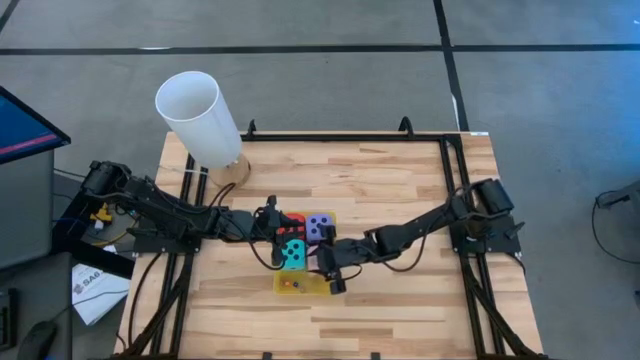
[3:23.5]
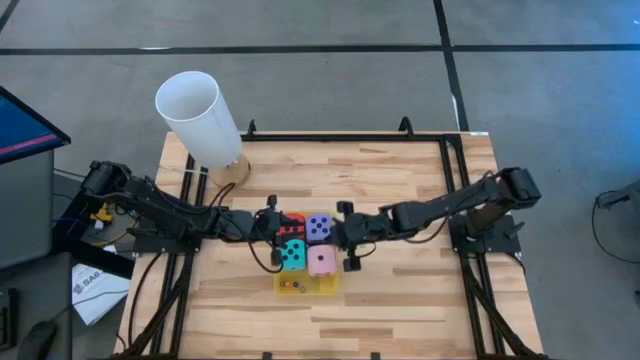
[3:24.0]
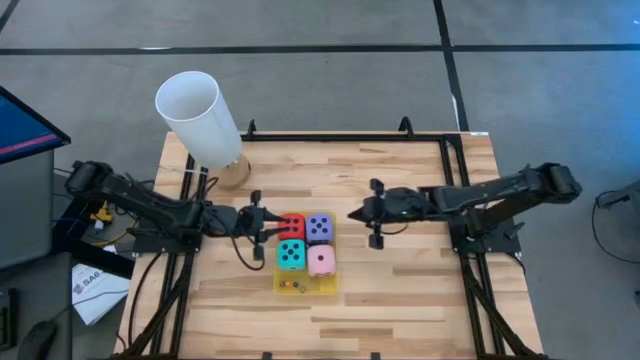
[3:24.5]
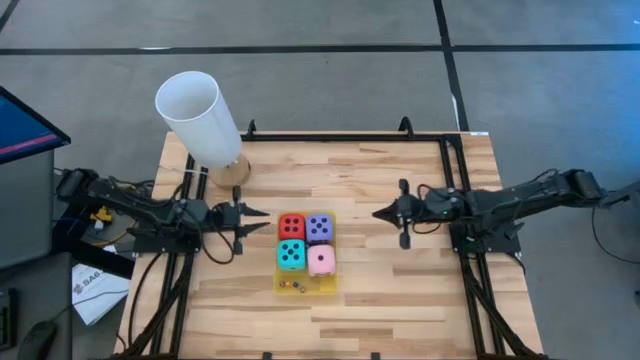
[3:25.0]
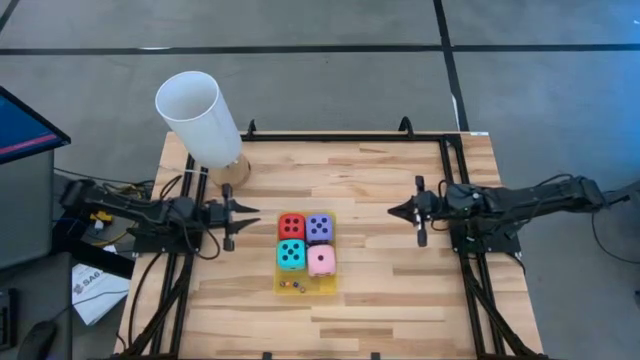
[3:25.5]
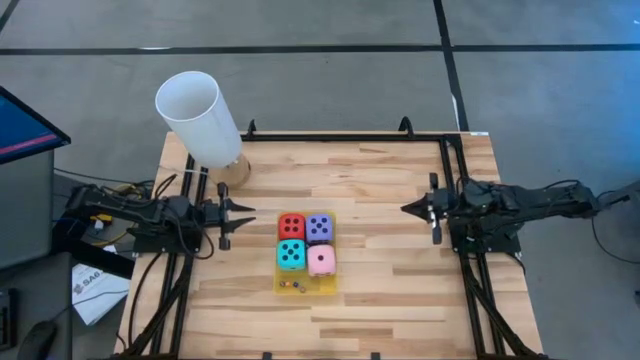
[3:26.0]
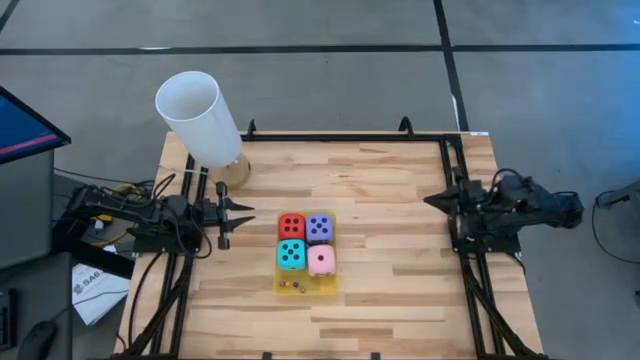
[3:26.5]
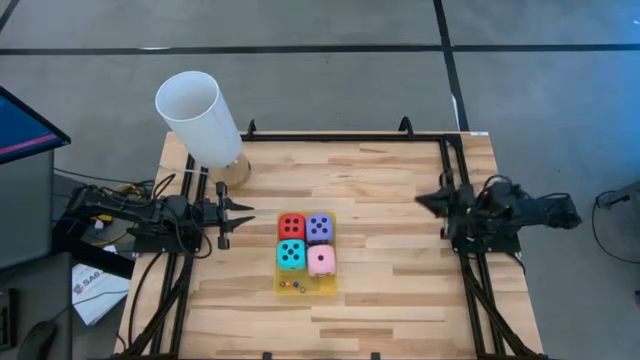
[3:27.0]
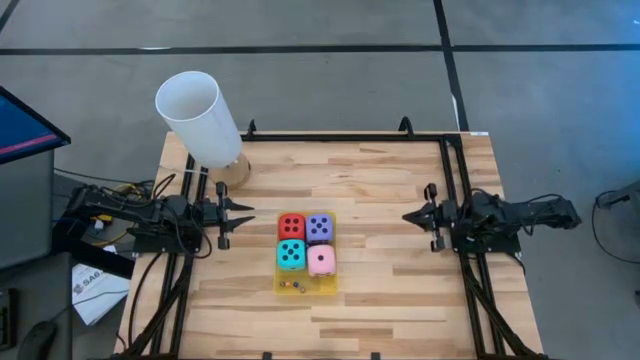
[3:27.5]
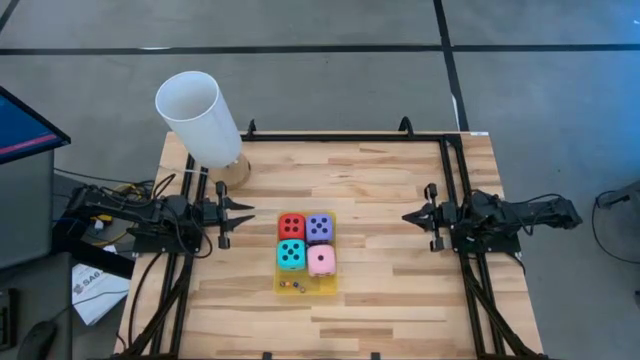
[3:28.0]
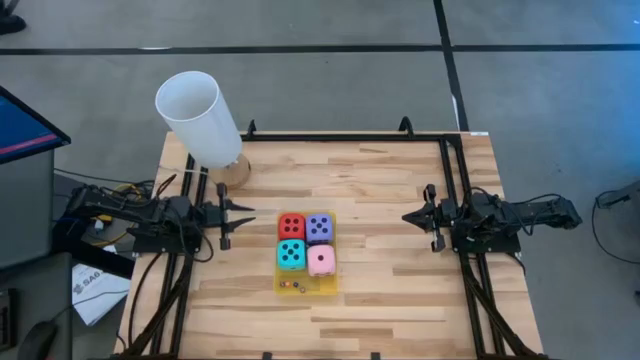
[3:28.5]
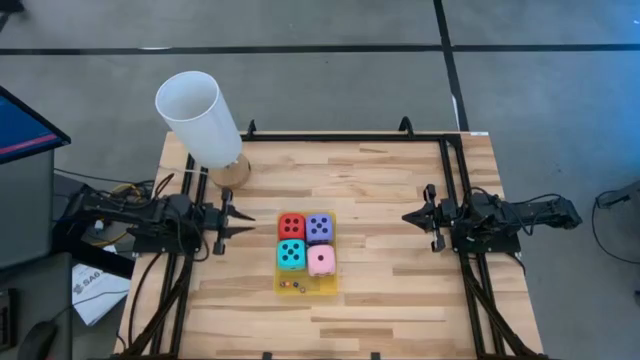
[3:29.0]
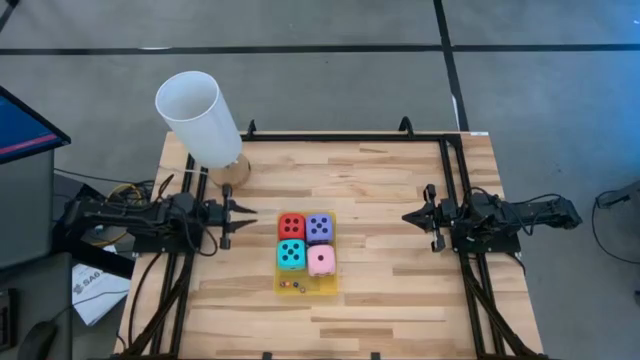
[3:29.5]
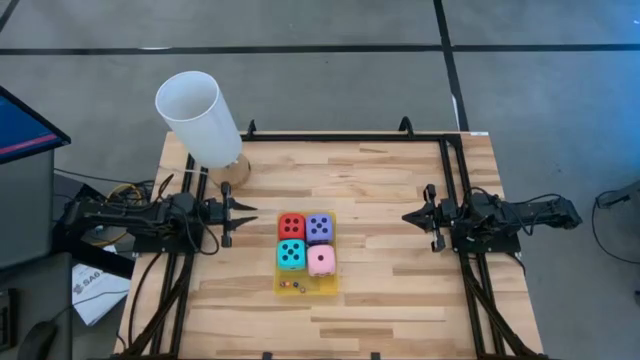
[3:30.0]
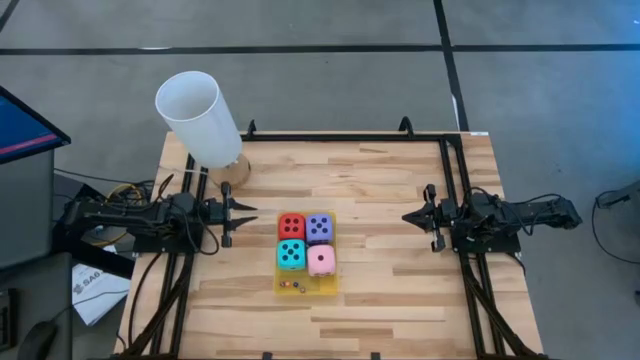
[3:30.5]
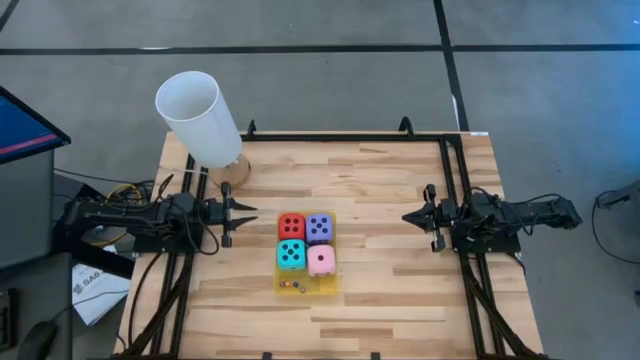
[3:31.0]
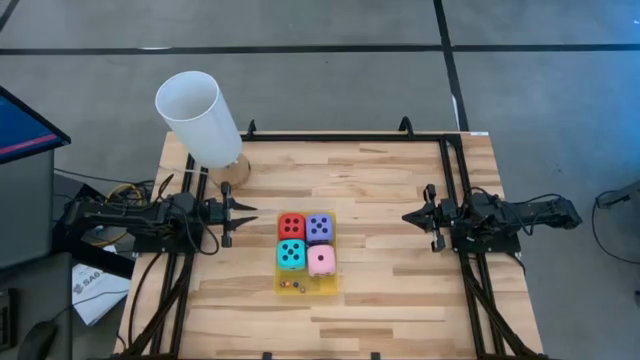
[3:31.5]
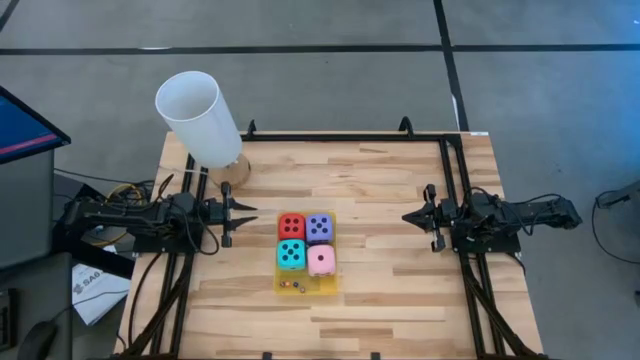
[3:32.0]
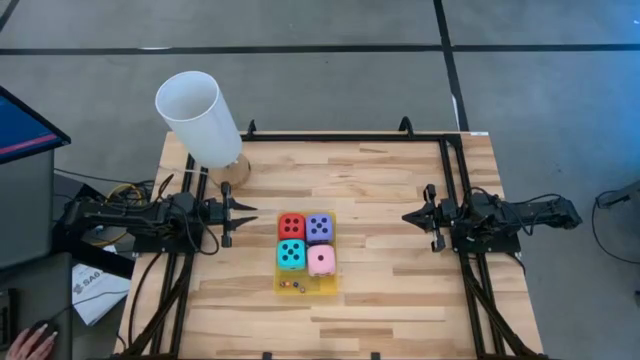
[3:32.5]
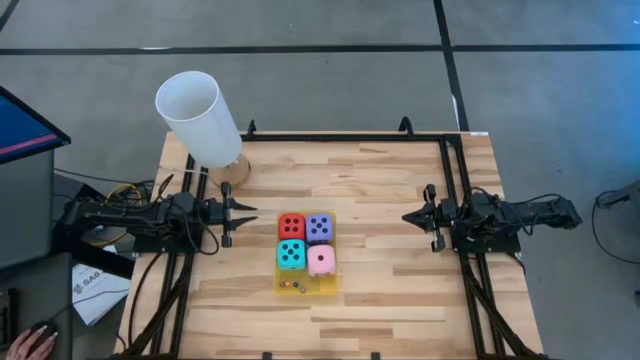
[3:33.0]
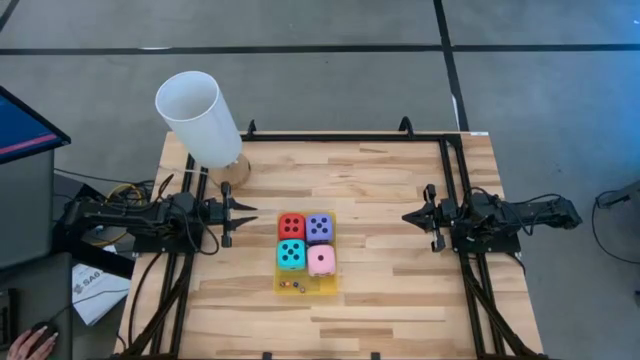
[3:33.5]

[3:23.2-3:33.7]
Task: Pick & Place Dice
Return to Home Position

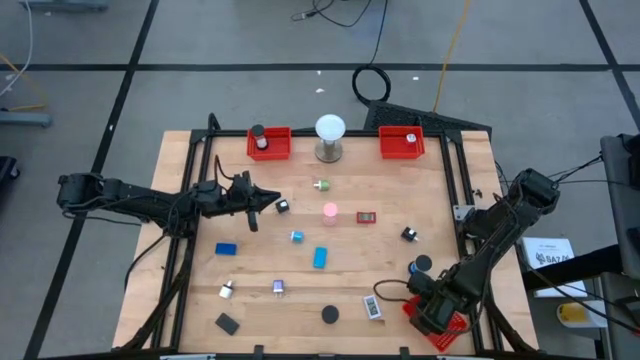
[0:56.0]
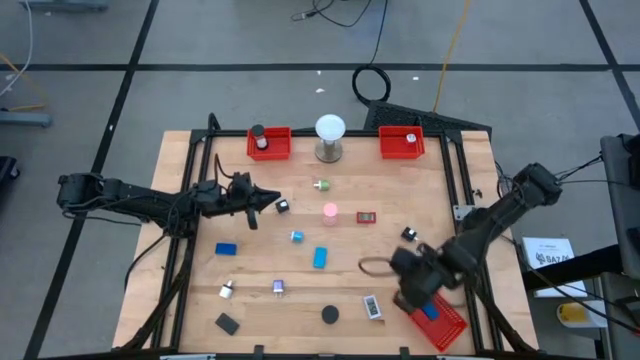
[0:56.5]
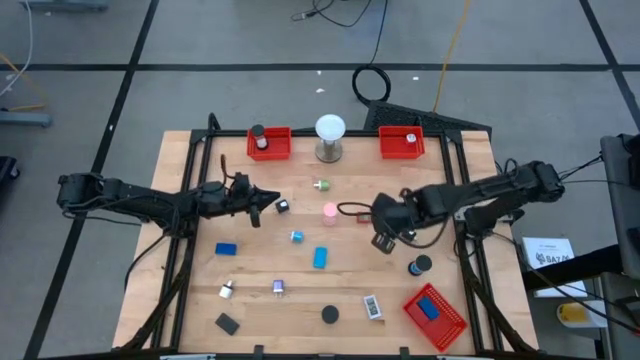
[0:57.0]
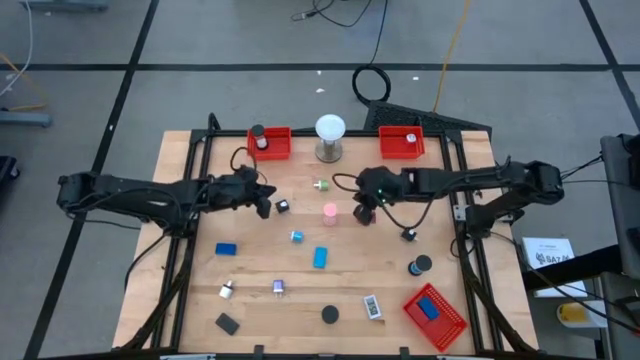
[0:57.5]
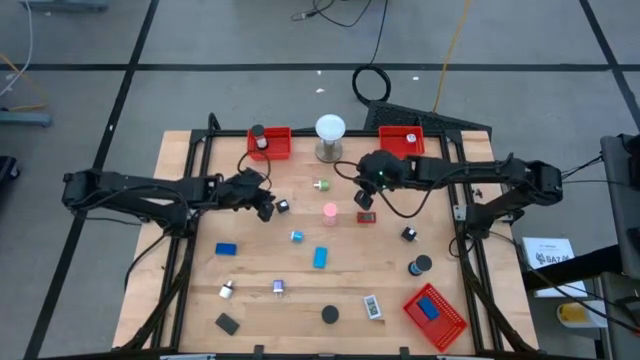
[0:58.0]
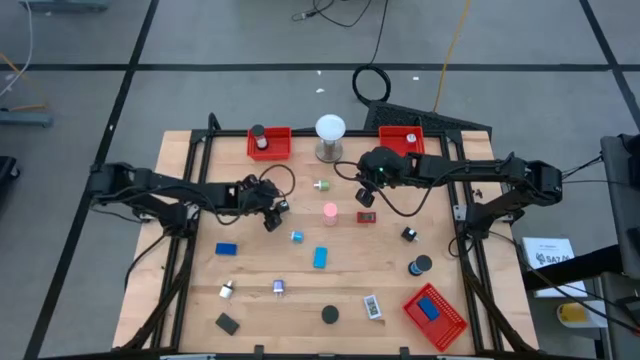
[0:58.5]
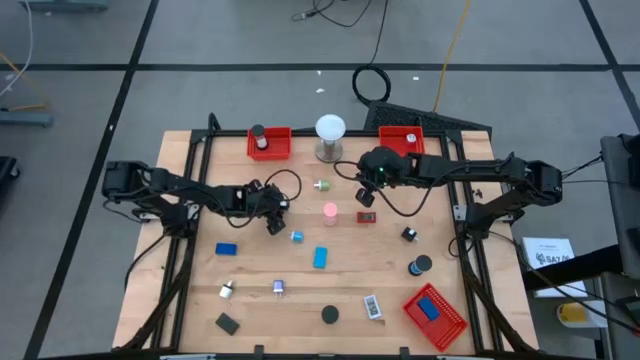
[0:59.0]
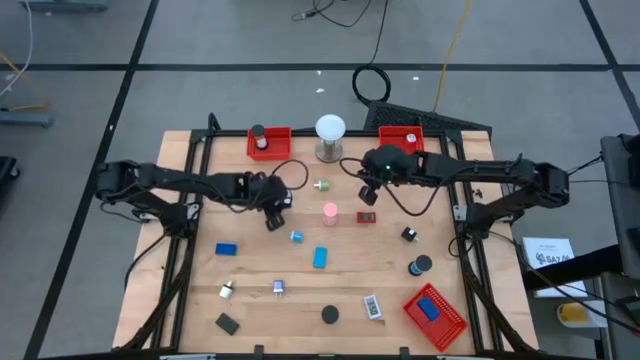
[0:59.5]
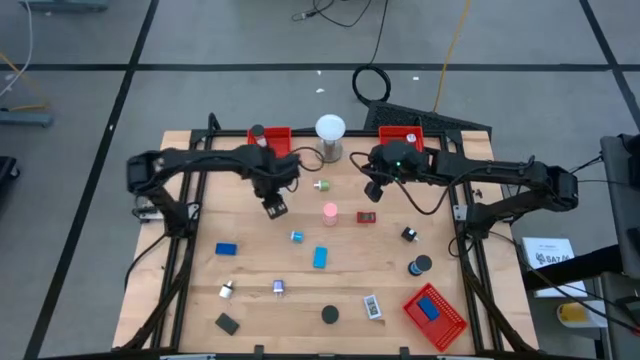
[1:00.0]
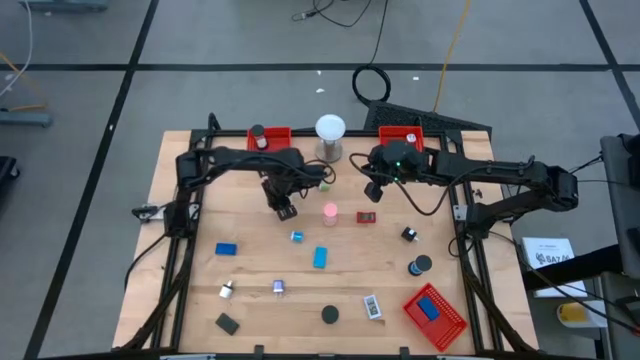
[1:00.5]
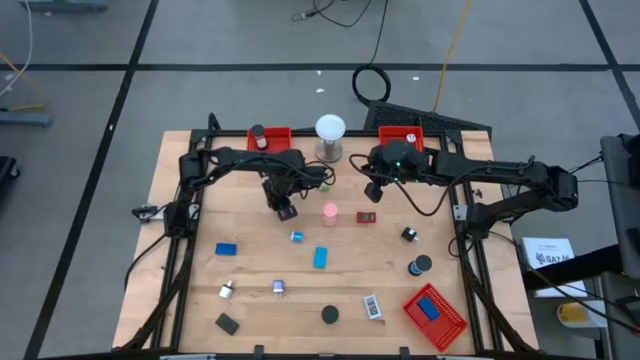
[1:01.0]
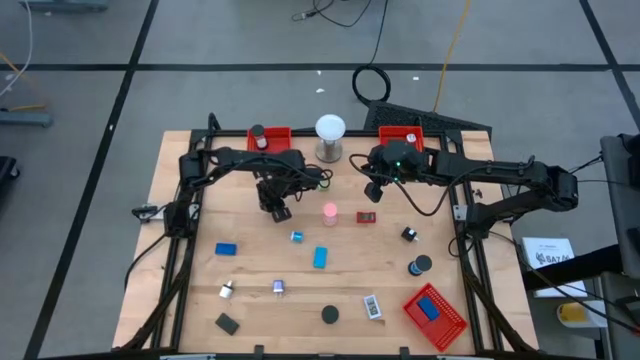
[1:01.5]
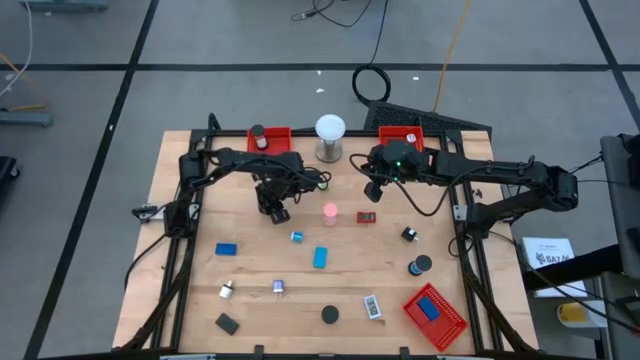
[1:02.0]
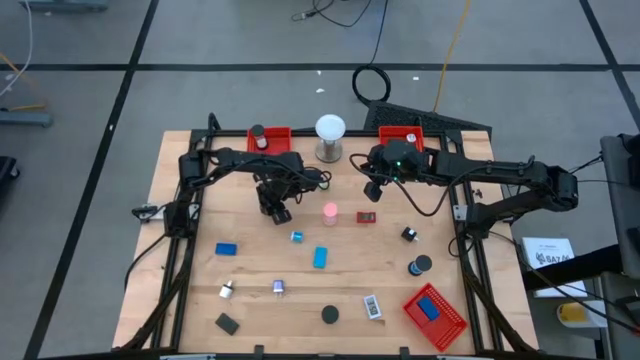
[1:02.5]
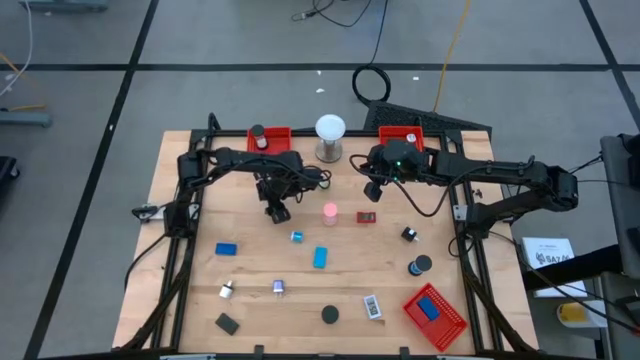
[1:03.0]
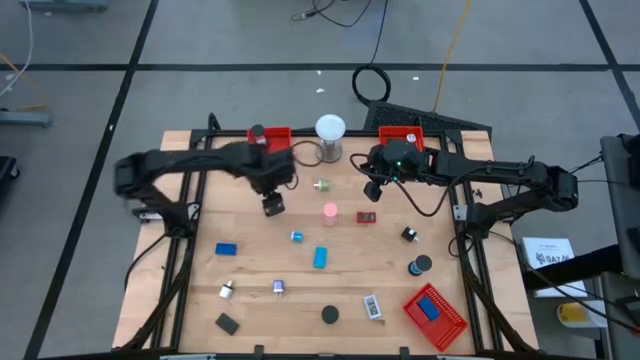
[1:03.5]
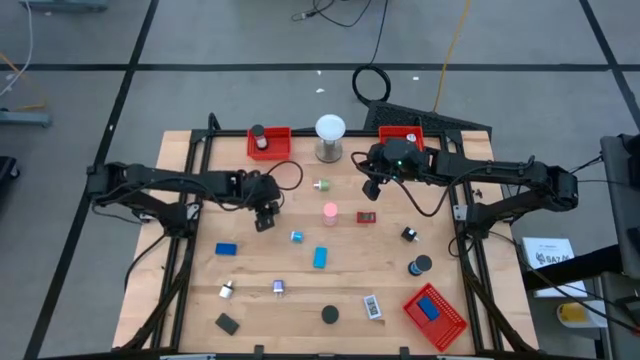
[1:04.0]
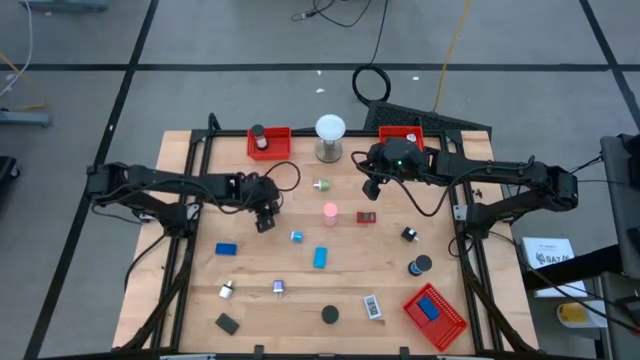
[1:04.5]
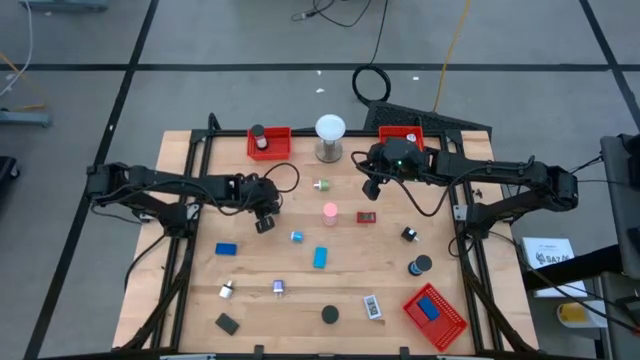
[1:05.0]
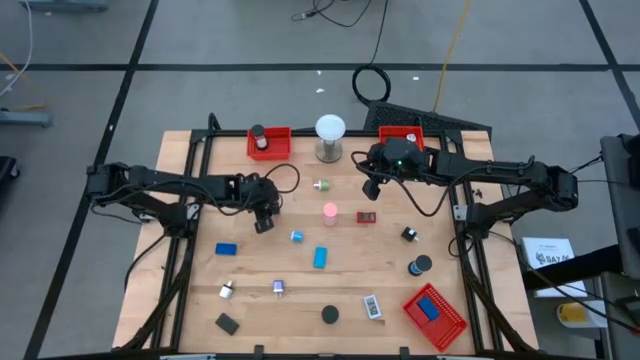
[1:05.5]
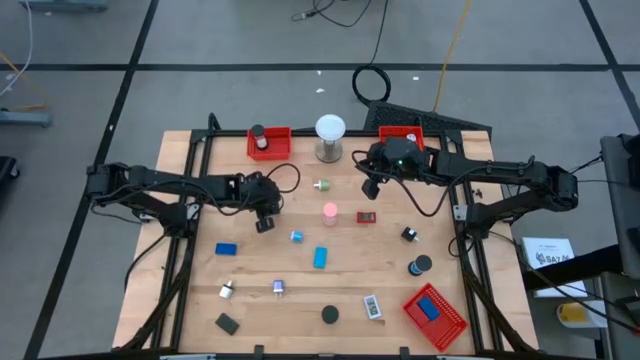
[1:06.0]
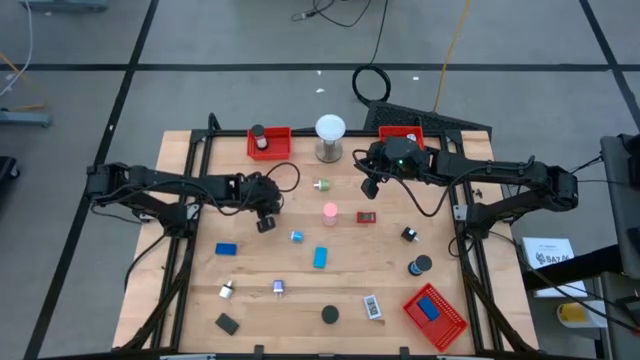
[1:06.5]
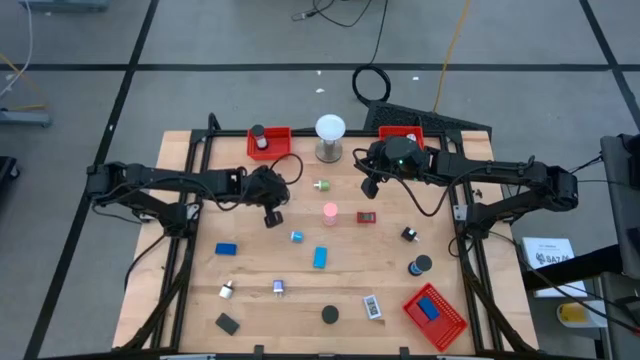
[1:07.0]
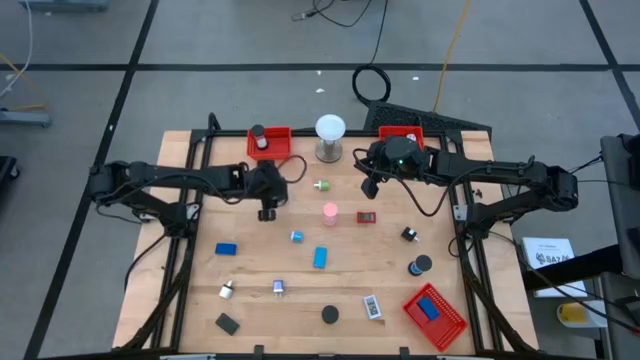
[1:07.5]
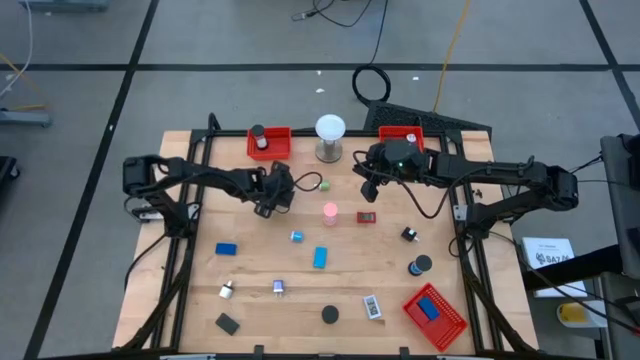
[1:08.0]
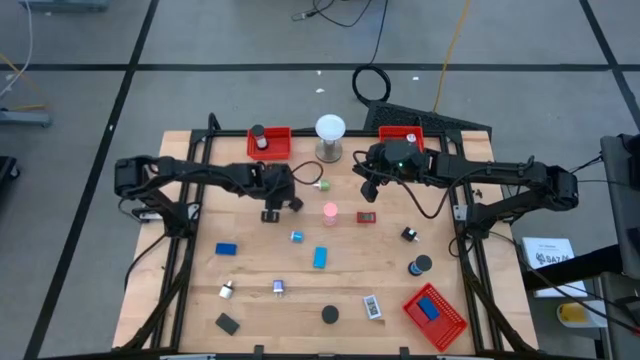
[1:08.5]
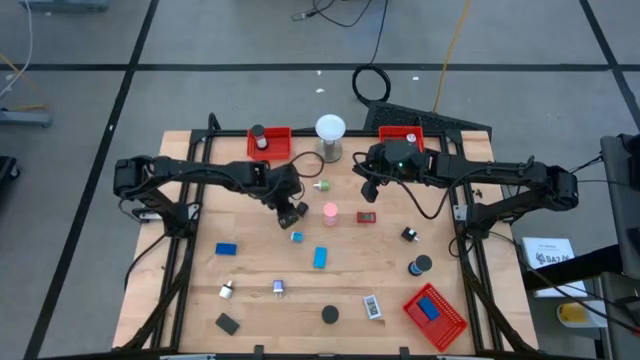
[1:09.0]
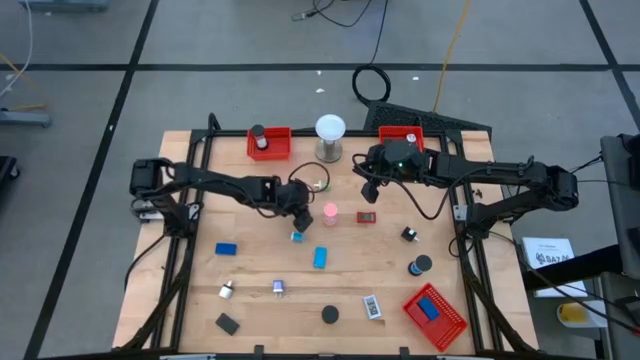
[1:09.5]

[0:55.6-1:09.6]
Task: Pick & Place Office items
Put the black charger adapter into the top right red bin
